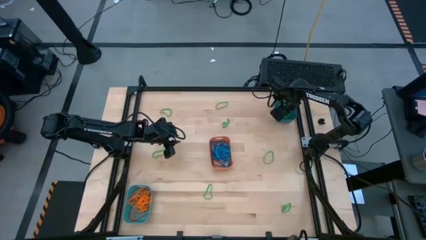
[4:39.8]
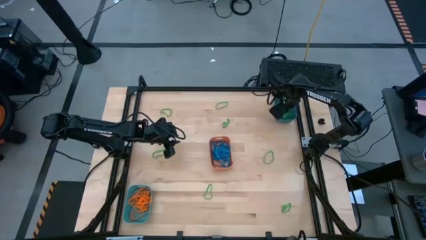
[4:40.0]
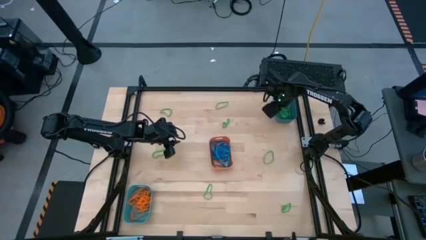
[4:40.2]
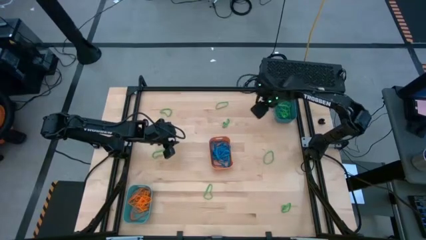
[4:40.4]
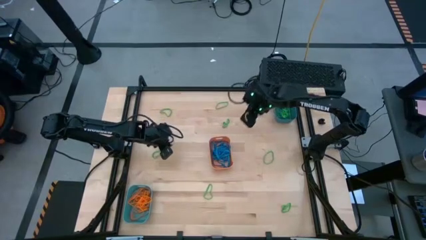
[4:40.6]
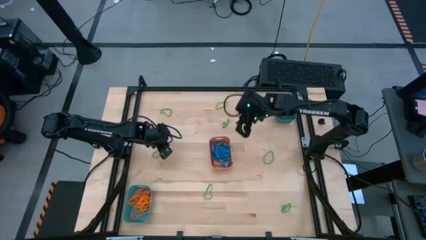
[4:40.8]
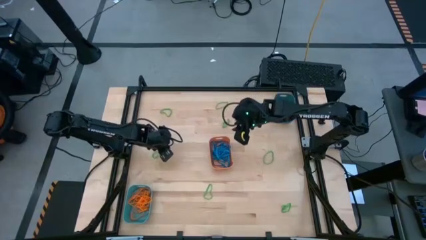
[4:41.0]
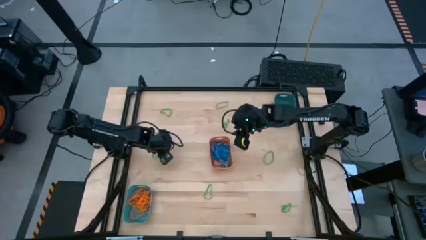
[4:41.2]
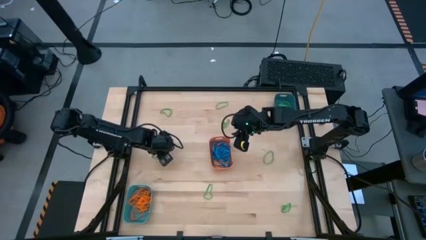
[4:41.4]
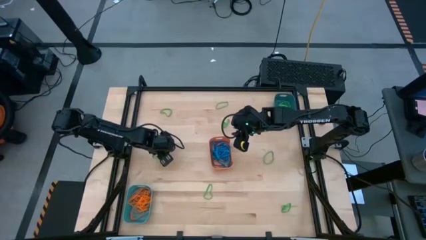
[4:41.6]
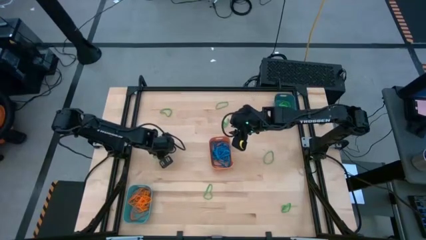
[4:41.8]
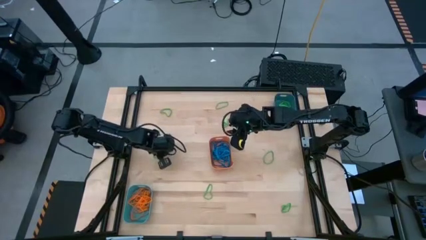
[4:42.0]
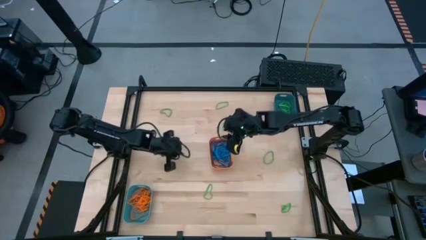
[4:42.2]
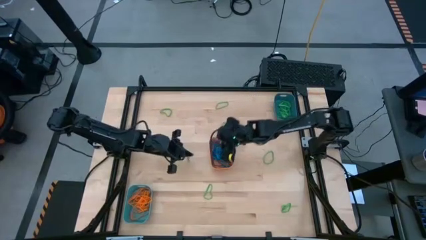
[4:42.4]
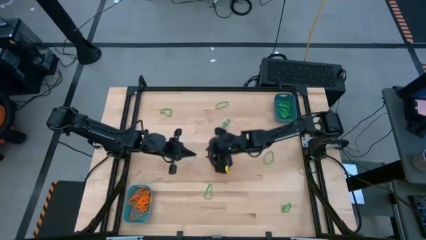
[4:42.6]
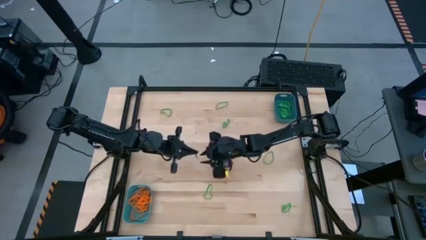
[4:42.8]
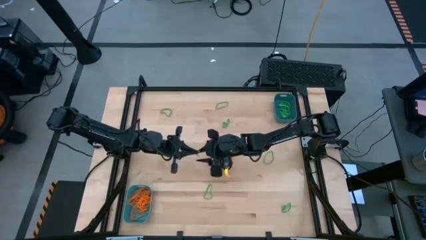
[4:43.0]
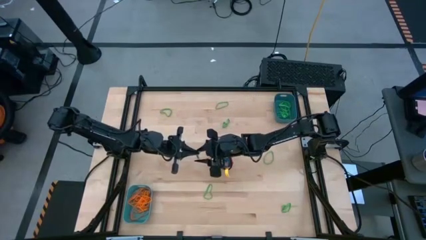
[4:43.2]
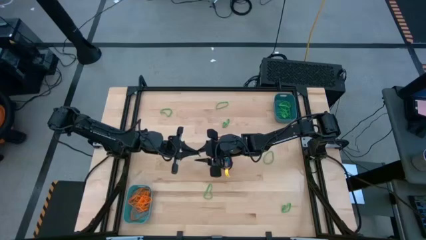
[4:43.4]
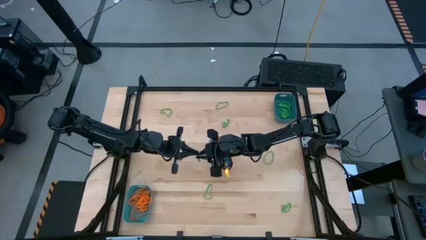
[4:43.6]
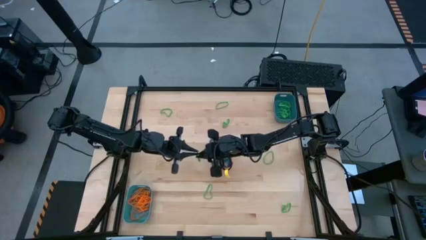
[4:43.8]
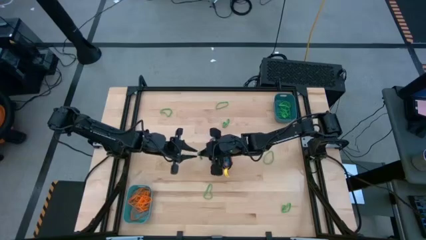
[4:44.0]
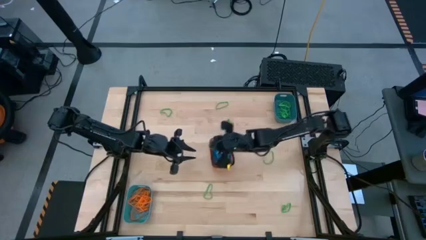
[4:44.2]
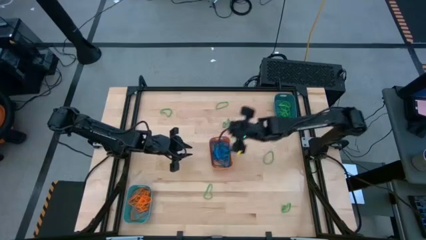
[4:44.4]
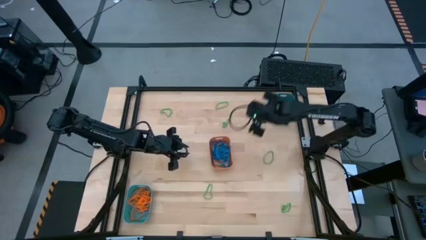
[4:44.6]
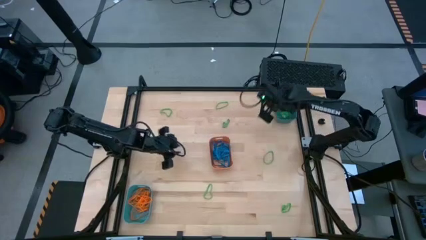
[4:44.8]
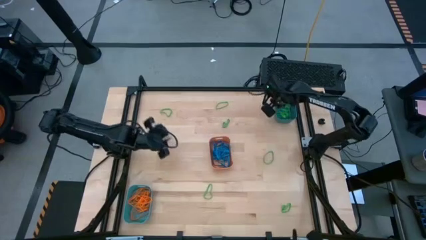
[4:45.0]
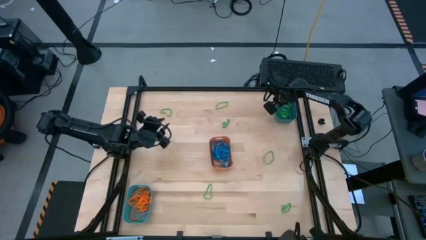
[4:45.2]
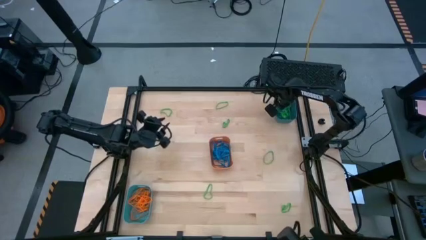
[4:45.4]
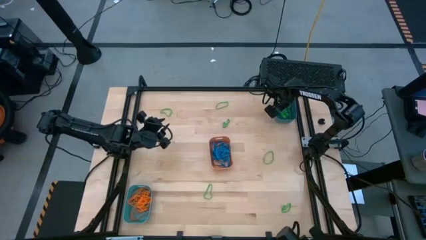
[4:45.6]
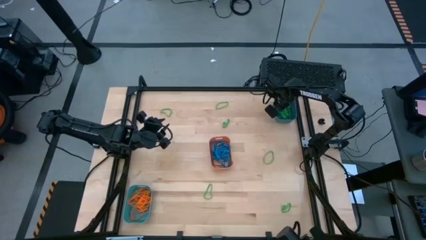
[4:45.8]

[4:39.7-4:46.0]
Task: Sort rubber bands into baskets
Put the green rubber band into the blue bin

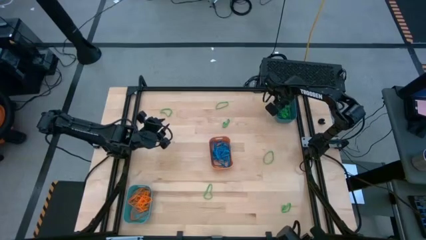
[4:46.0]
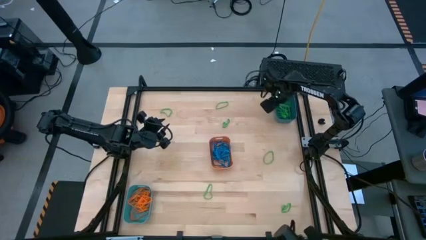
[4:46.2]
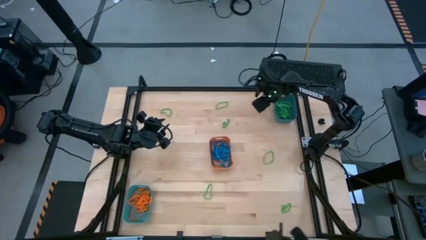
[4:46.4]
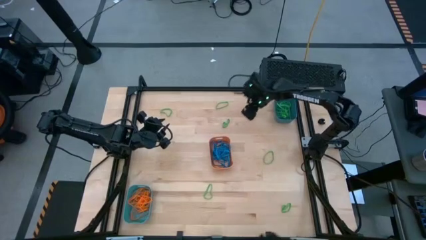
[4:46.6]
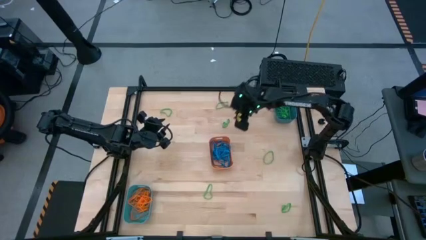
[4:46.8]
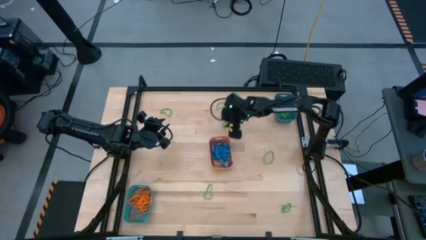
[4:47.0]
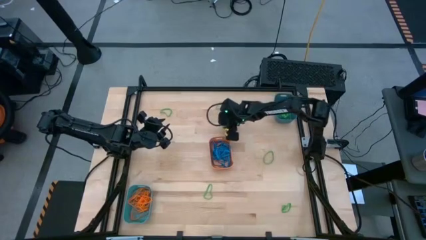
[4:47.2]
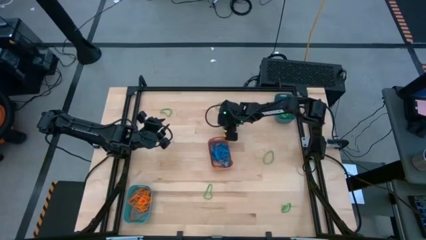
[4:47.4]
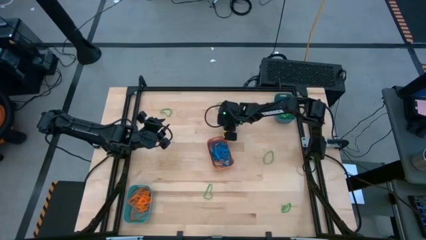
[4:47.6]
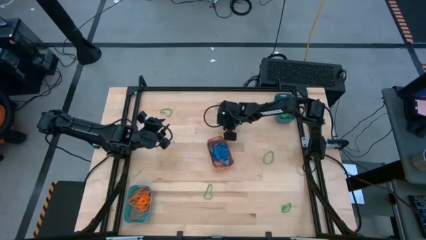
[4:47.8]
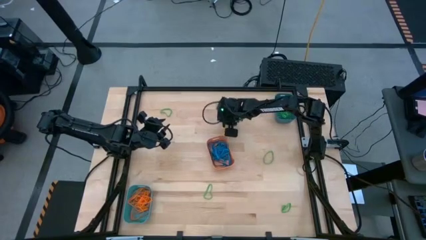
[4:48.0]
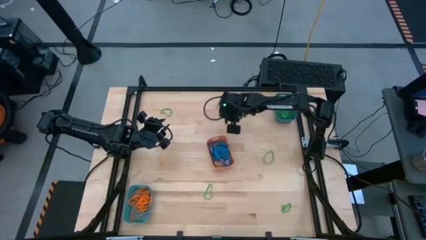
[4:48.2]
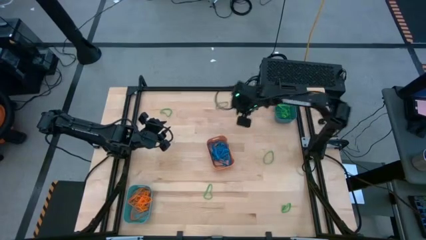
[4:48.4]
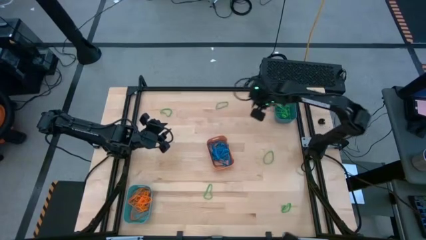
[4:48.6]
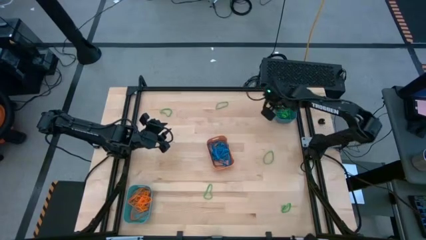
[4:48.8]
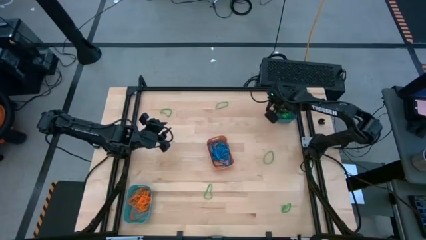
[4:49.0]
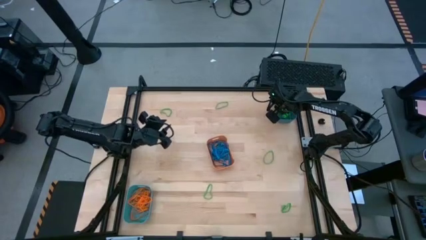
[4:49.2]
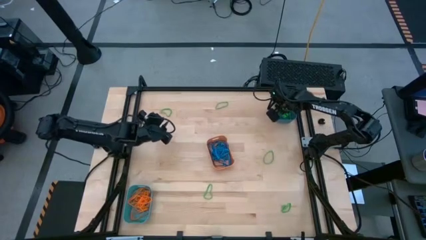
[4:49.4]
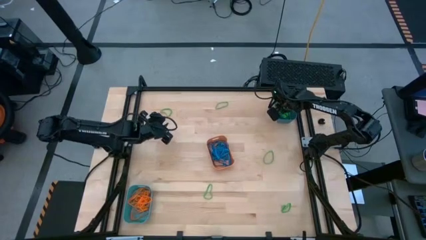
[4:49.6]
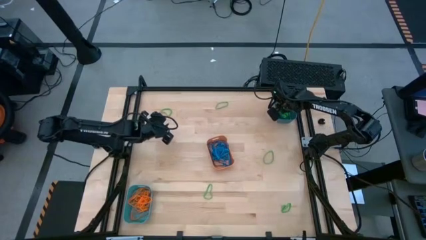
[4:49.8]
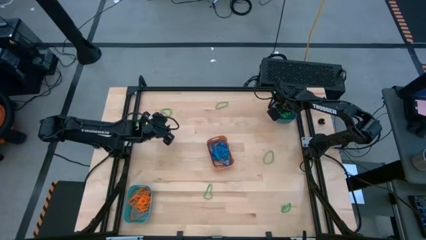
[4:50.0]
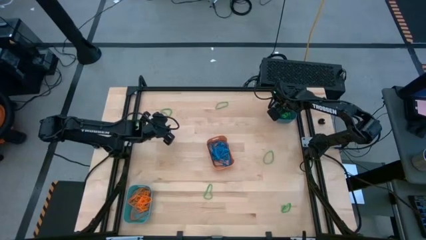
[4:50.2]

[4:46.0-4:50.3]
Put the green rubber band into the blue bin

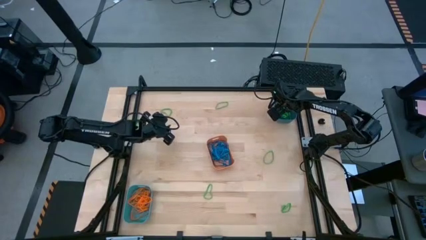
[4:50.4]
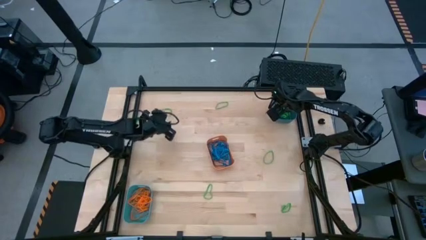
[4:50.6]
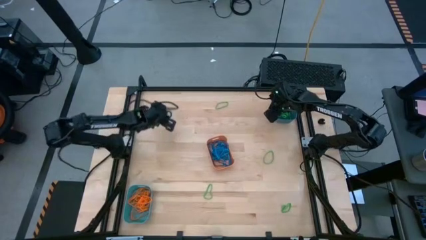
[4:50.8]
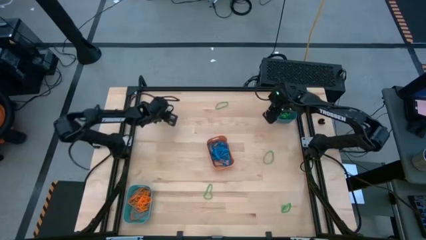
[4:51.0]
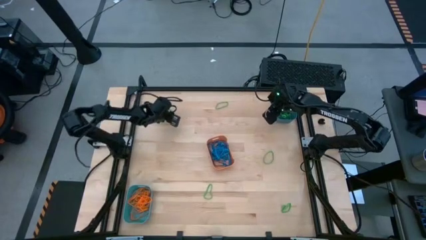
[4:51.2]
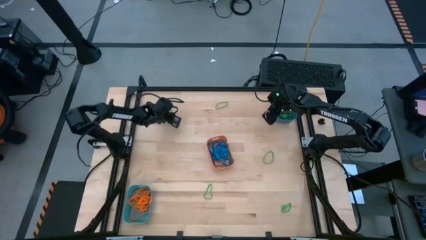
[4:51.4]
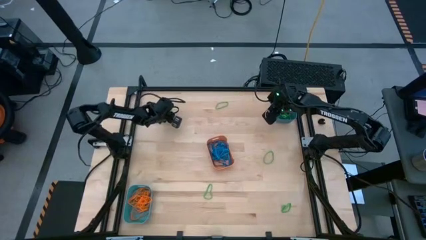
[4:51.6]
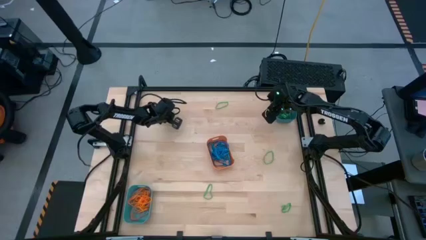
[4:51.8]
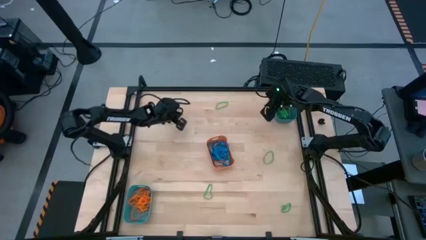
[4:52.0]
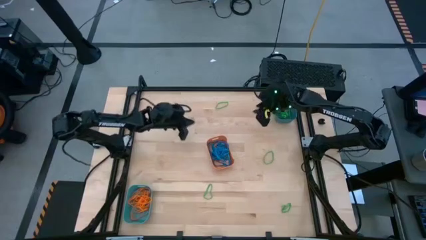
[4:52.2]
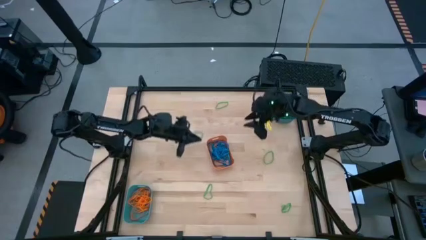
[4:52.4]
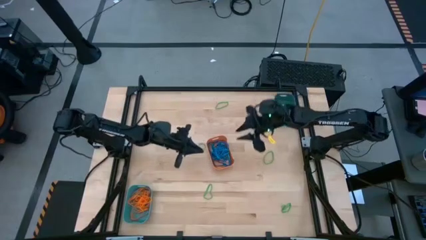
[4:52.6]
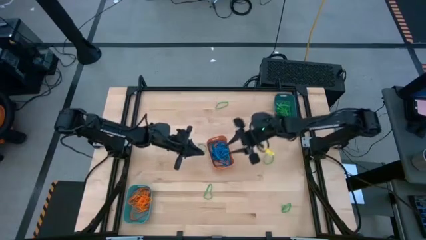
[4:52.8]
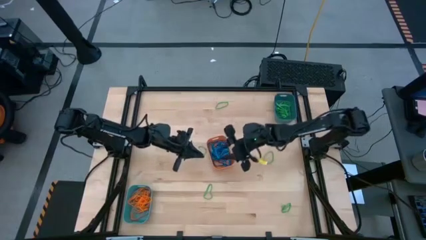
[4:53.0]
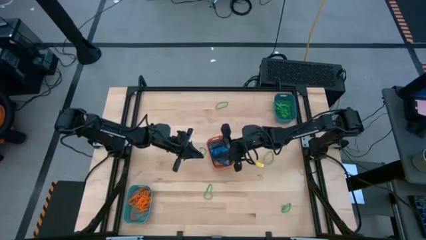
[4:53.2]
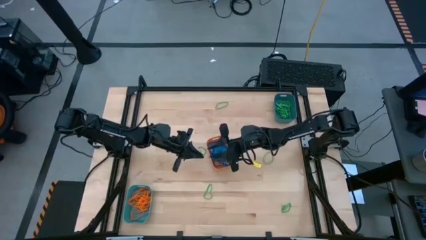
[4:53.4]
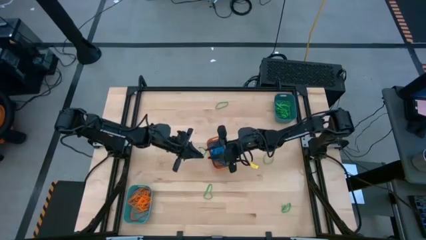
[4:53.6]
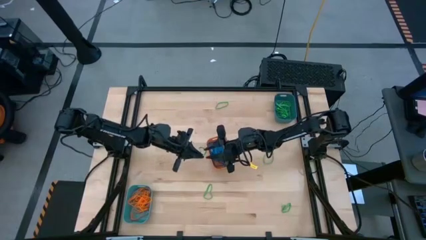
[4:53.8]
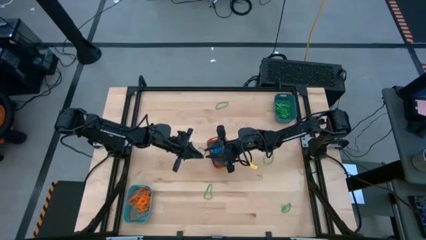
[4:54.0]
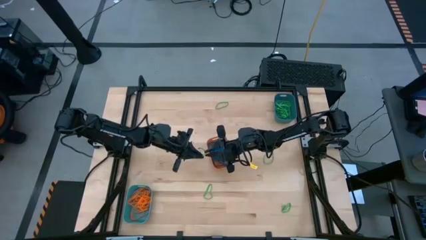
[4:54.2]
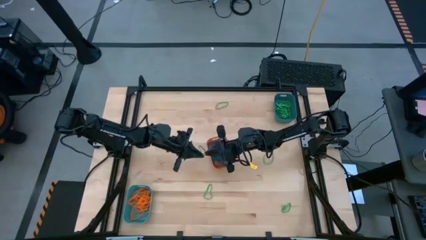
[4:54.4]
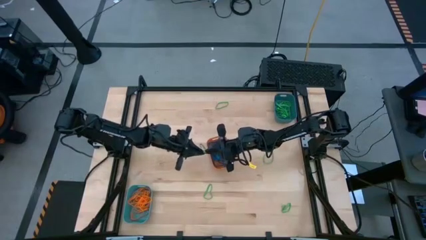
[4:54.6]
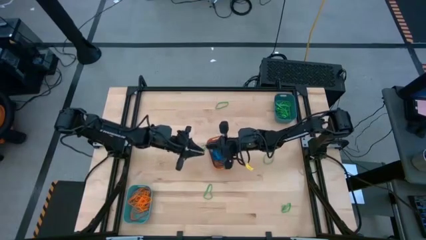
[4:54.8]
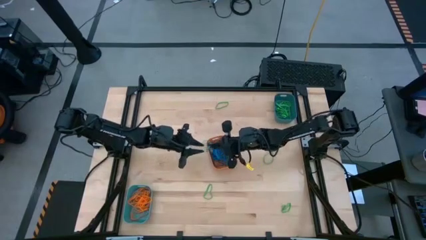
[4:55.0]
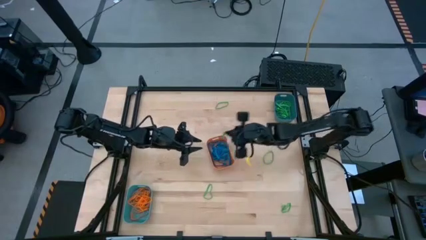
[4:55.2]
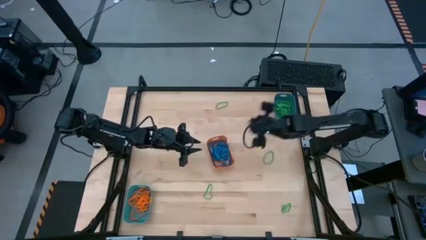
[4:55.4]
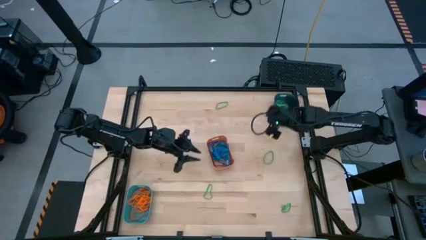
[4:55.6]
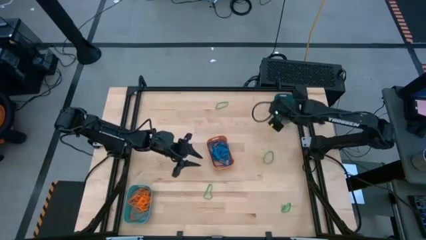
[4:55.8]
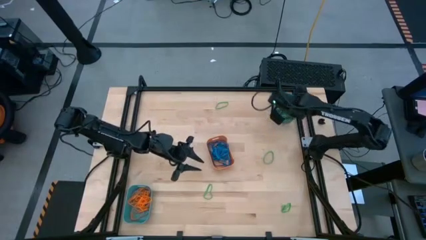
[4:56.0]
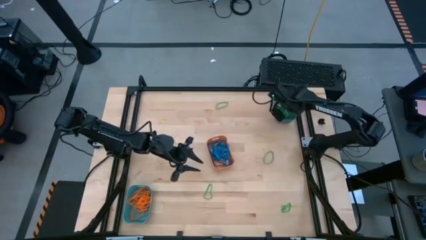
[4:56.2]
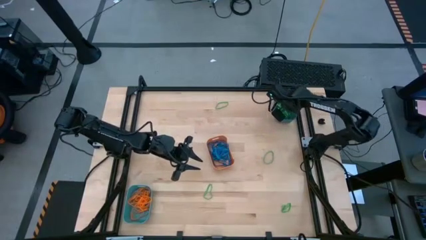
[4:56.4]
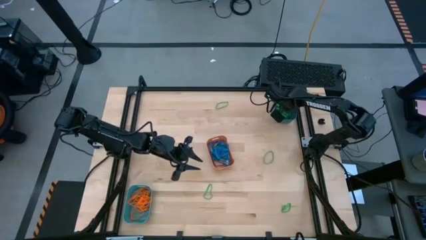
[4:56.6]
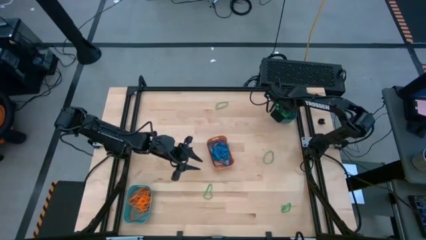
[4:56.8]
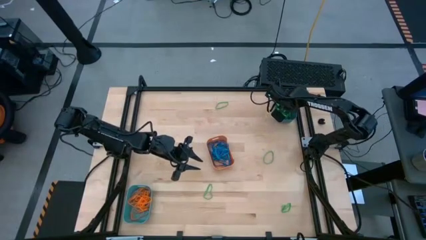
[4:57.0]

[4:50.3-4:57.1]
Put the green rubber band into the blue bin
